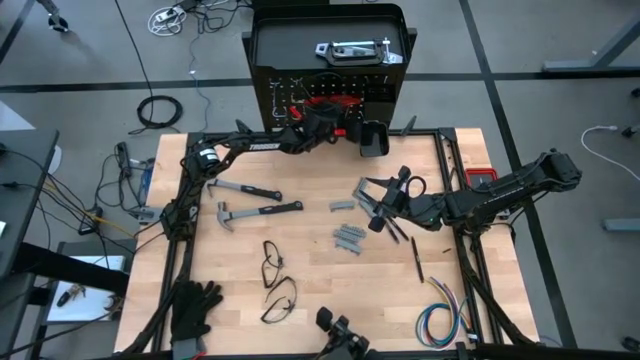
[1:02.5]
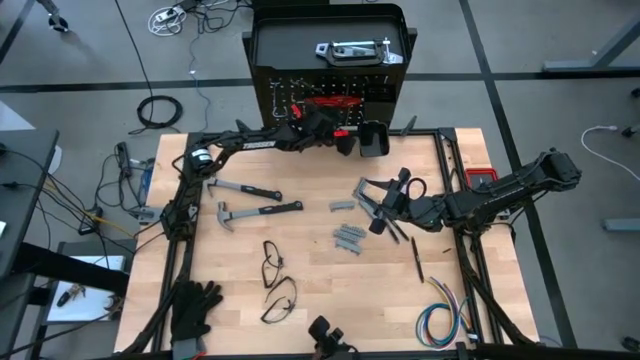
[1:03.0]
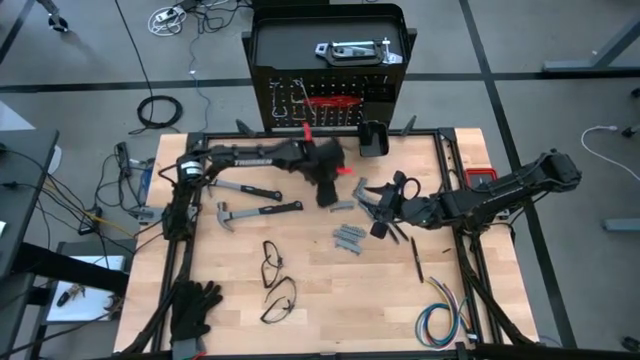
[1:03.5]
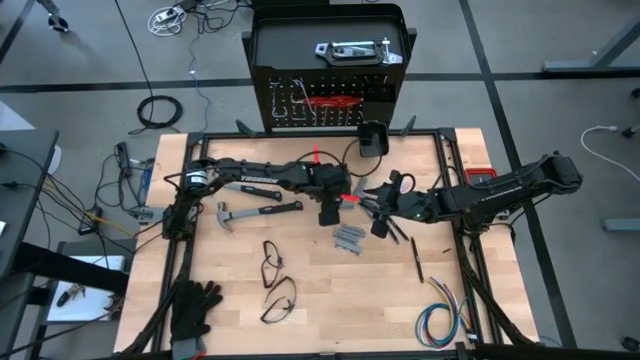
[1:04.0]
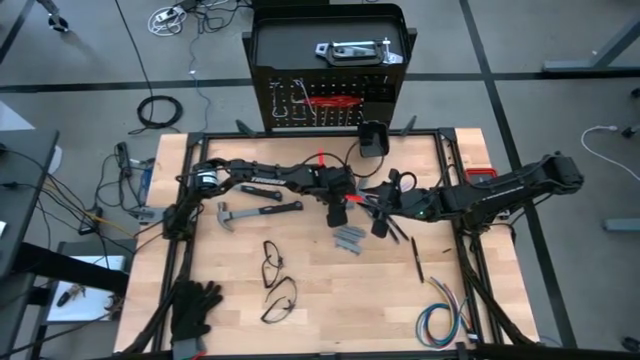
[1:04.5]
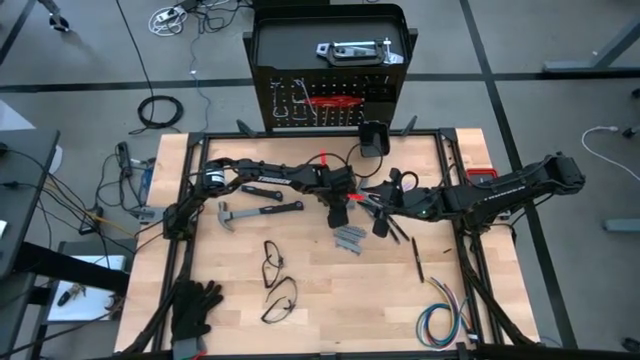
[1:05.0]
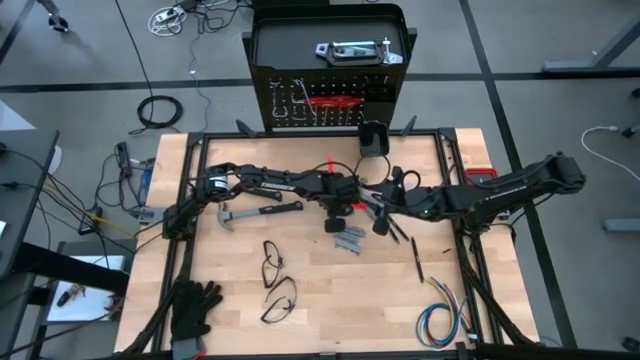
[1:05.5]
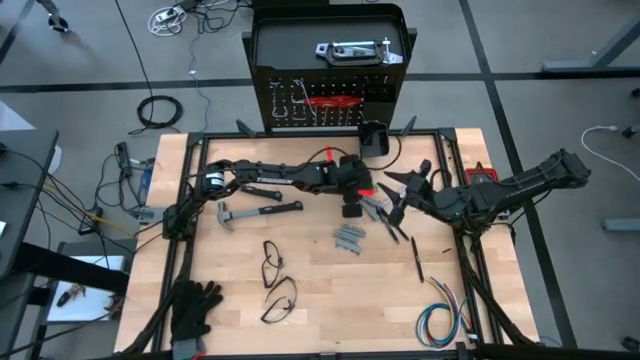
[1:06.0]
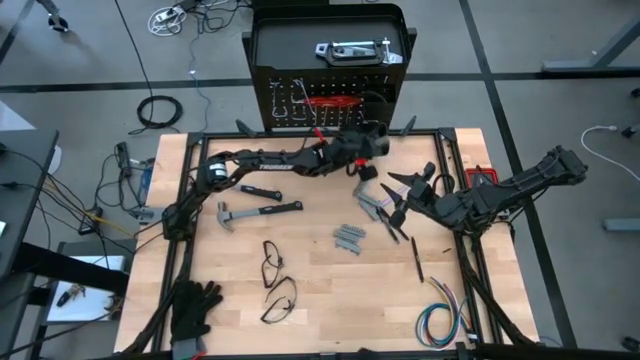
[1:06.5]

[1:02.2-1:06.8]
Task: Hang tools onto peg board
Put the screwdriver bits on the pegboard

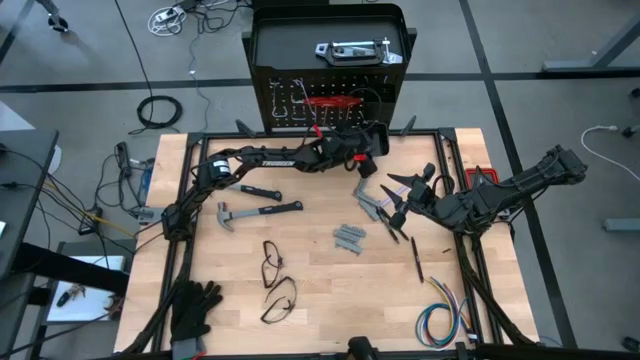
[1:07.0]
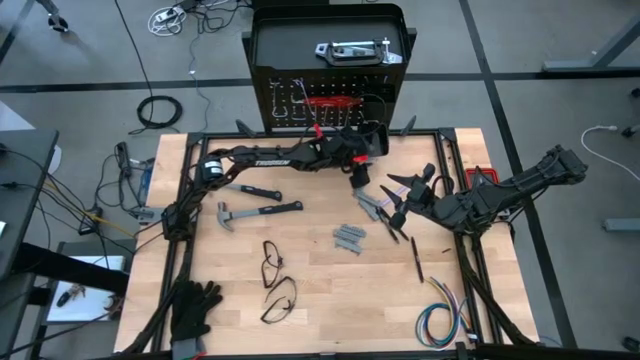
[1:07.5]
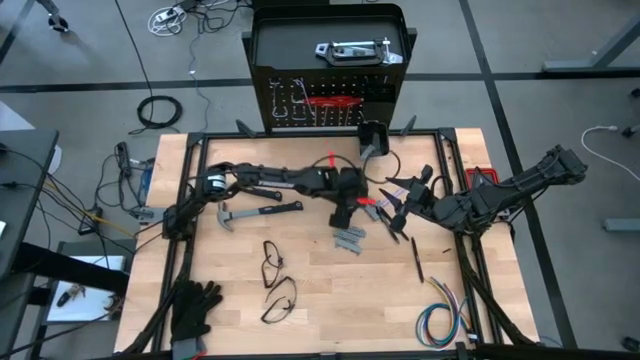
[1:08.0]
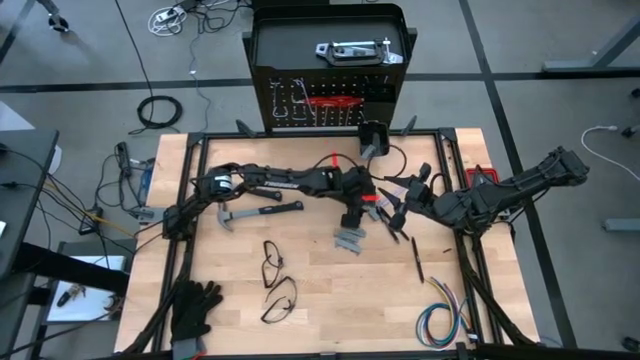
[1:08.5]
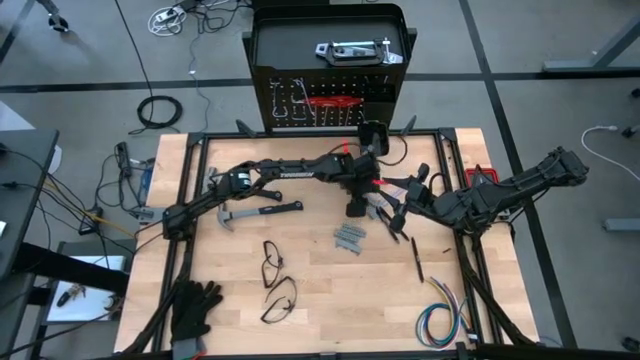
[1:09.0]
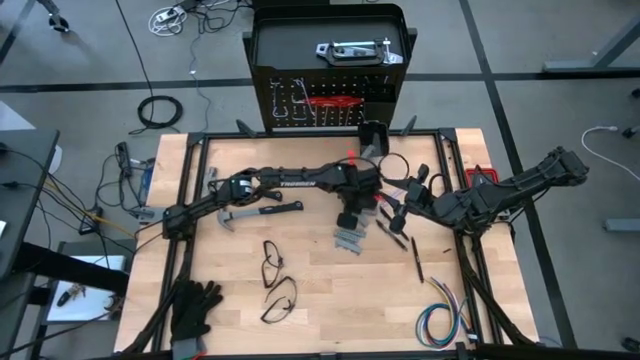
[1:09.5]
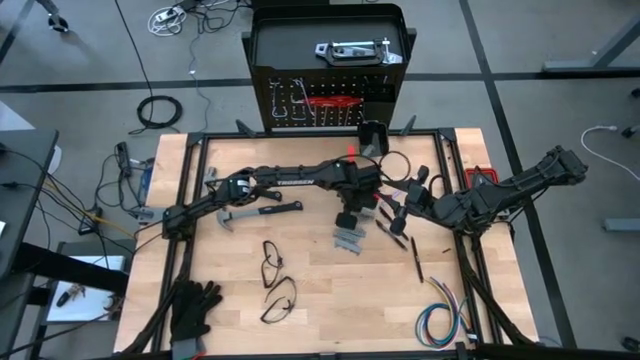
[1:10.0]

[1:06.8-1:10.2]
Put the screwdriver bits on the pegboard

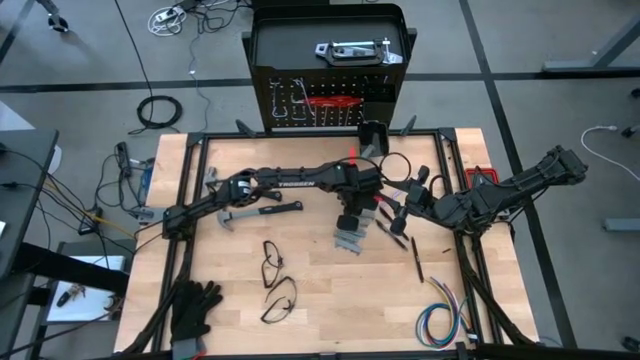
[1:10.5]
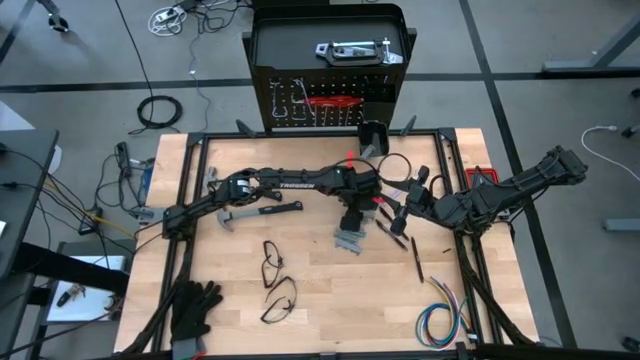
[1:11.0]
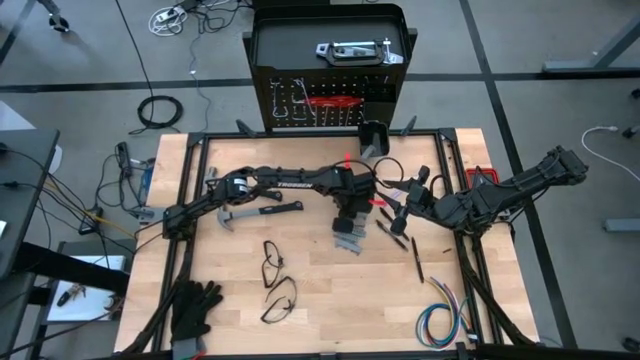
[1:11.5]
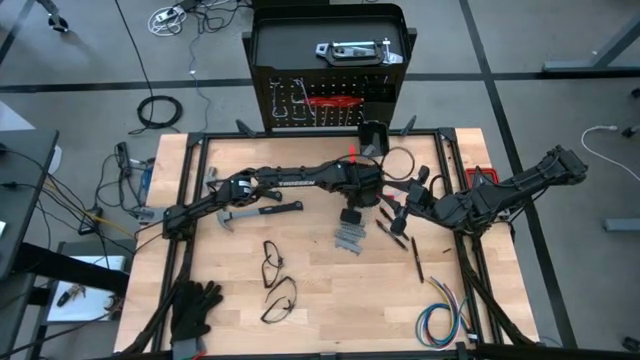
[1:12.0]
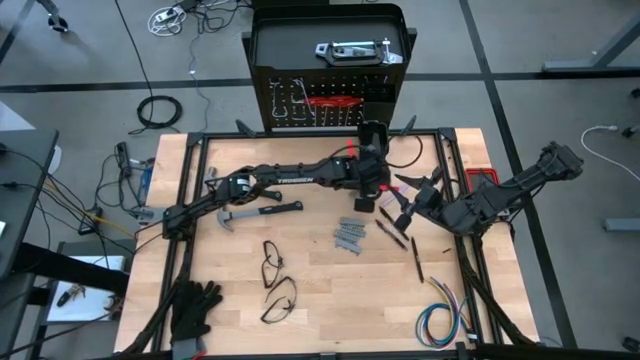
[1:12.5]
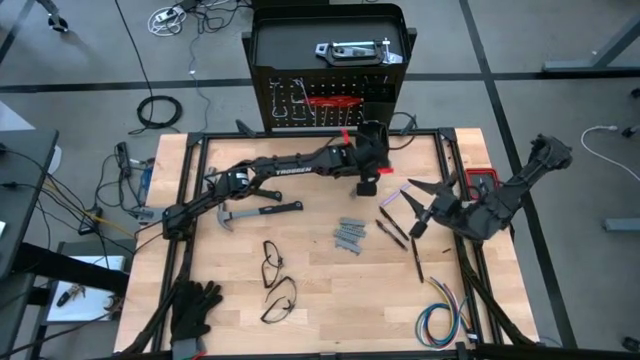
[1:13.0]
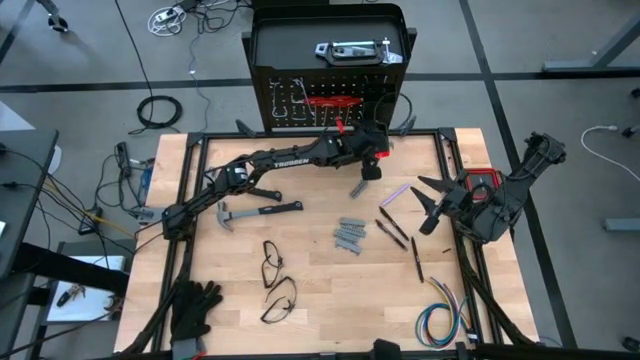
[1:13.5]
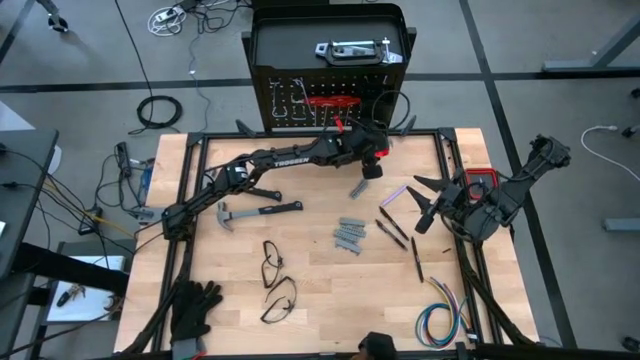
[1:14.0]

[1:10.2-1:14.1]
Put the screwdriver bits on the pegboard

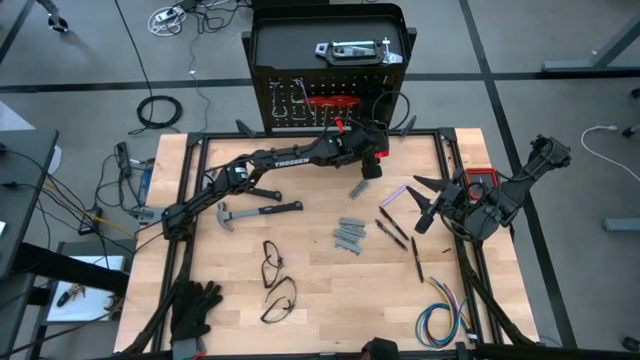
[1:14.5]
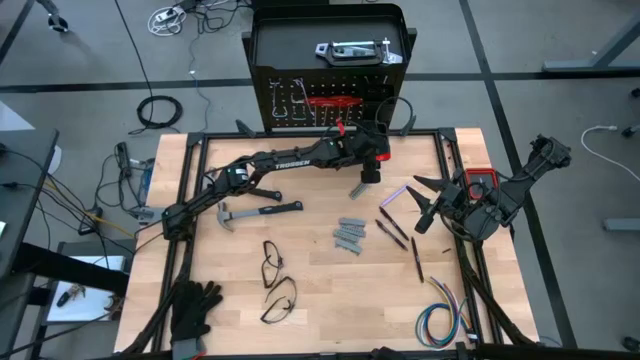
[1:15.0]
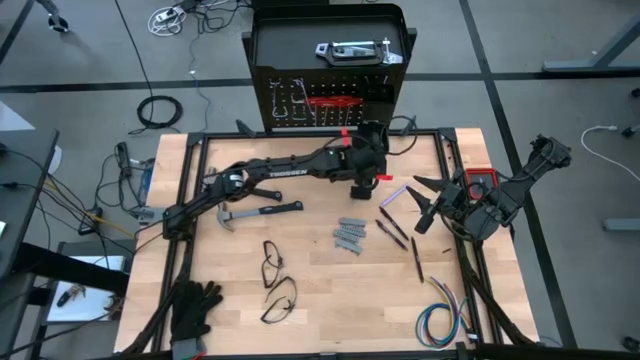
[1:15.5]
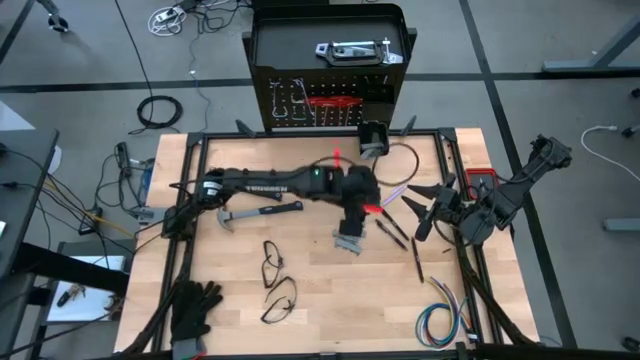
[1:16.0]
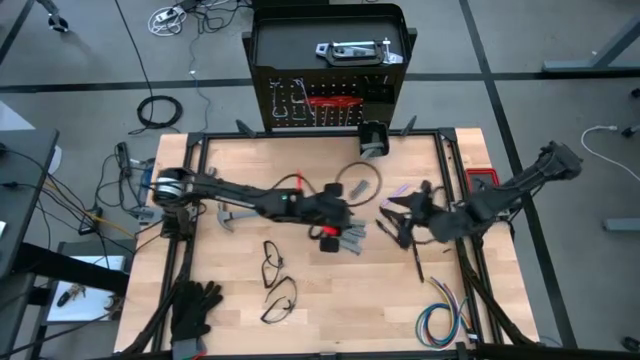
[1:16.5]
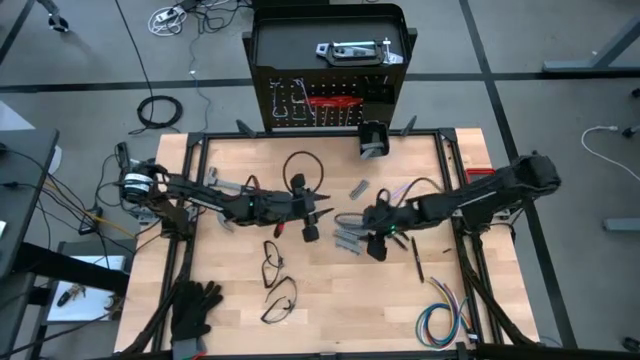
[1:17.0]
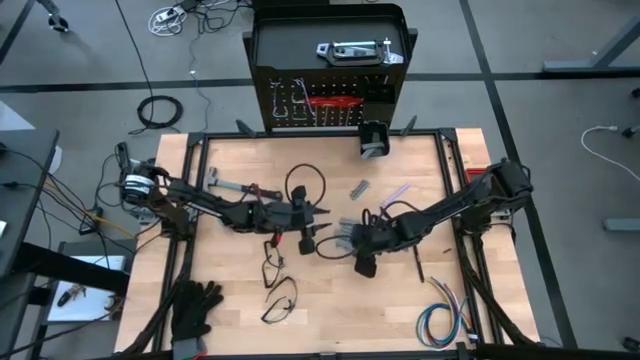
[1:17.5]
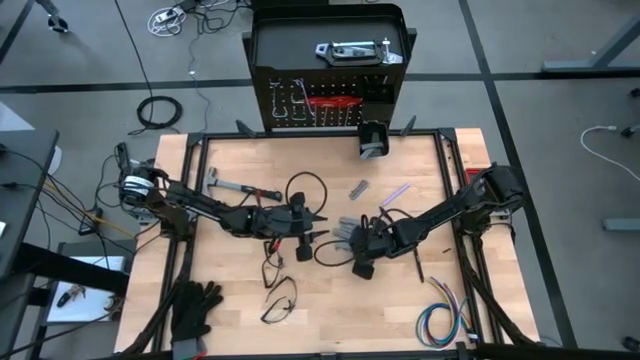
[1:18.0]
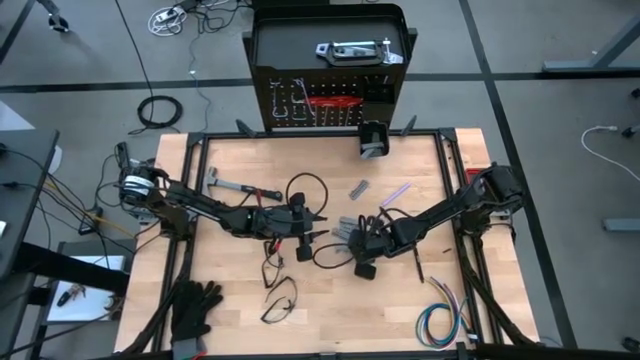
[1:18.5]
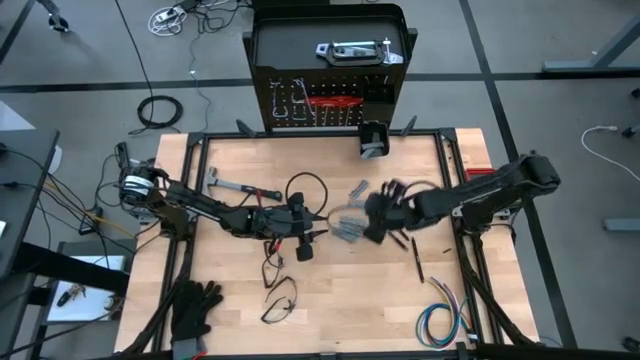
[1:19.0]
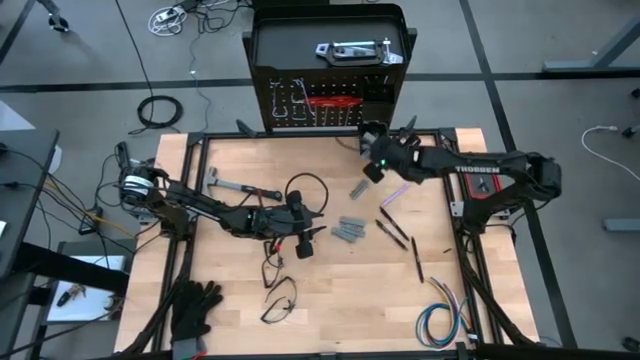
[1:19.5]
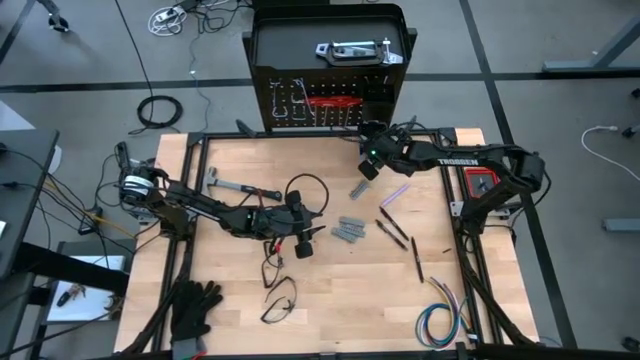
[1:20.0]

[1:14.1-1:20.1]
Put the screwdriver bits on the pegboard

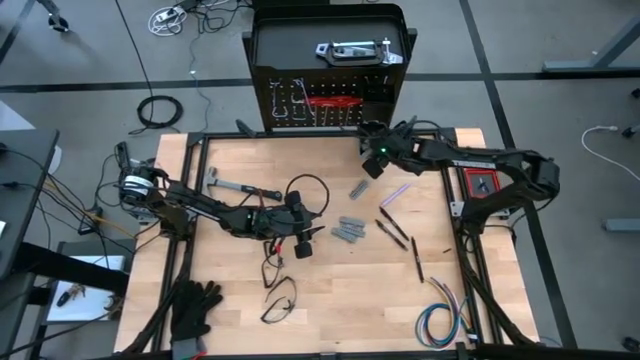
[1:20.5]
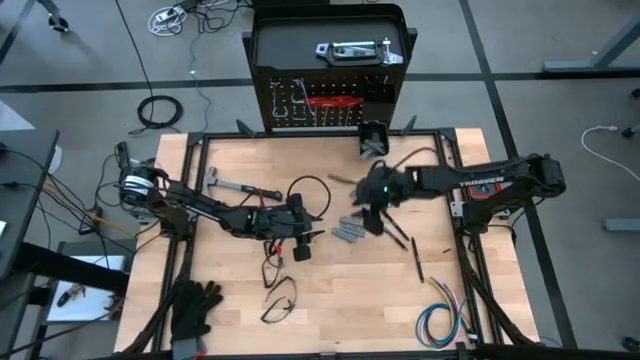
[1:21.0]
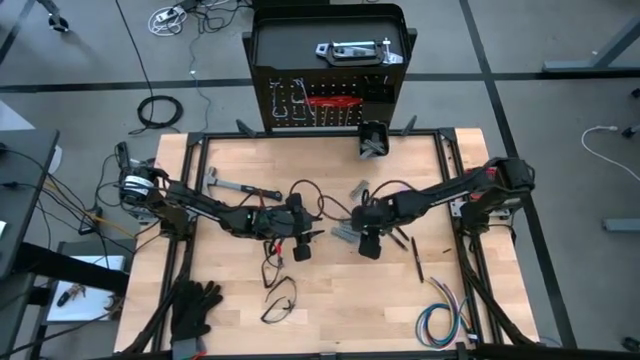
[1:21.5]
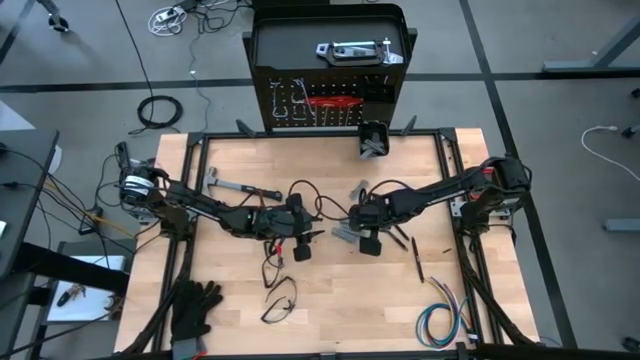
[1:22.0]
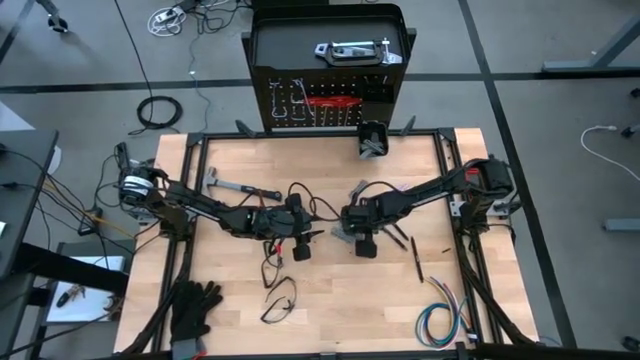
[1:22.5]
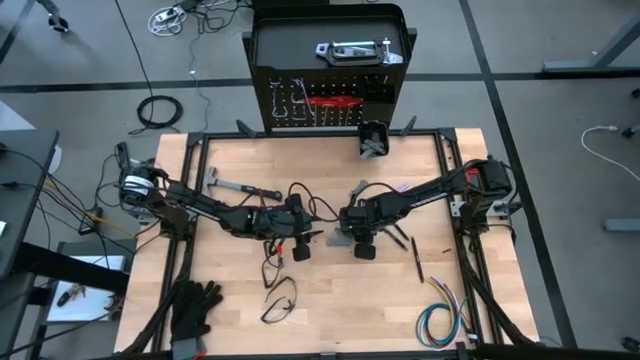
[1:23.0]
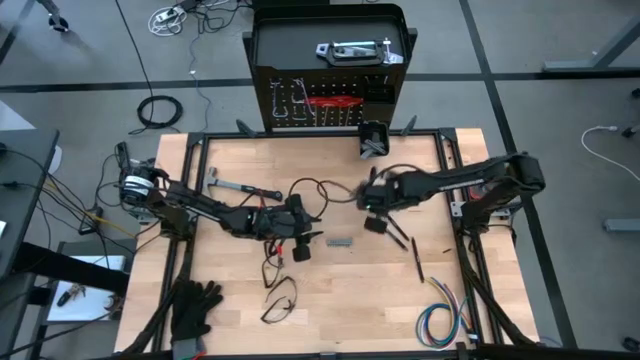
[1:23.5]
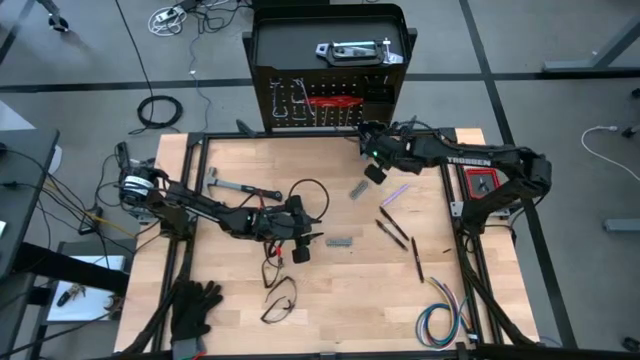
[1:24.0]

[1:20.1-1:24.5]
Put the screwdriver bits on the pegboard
